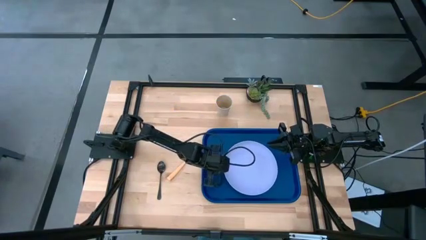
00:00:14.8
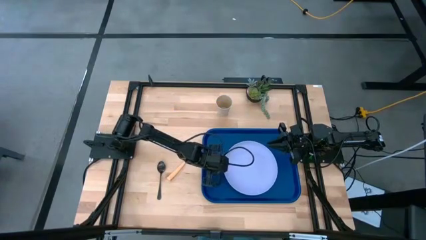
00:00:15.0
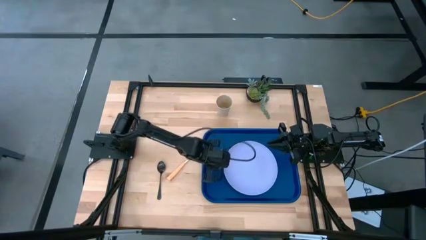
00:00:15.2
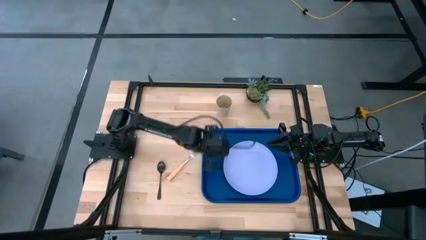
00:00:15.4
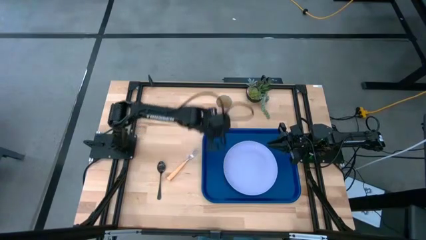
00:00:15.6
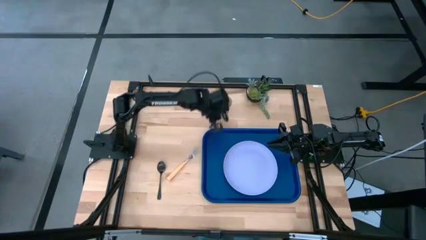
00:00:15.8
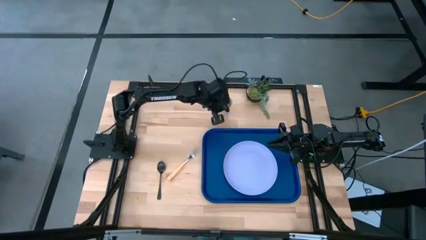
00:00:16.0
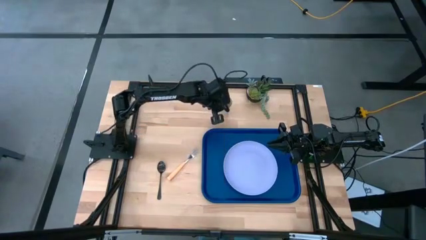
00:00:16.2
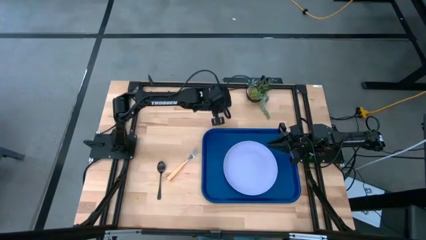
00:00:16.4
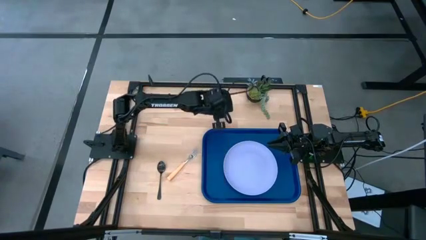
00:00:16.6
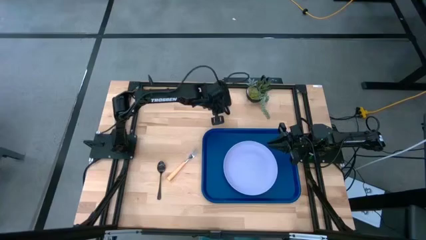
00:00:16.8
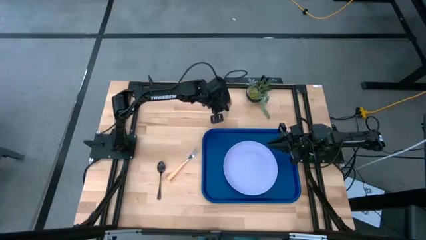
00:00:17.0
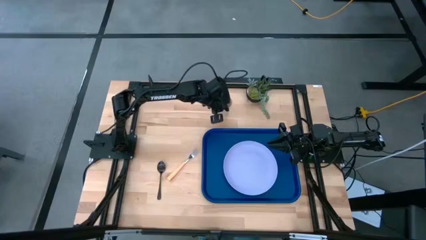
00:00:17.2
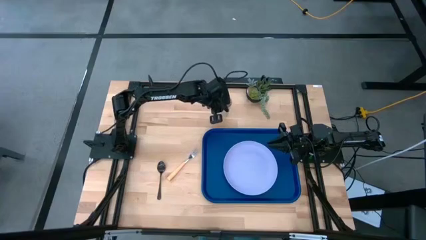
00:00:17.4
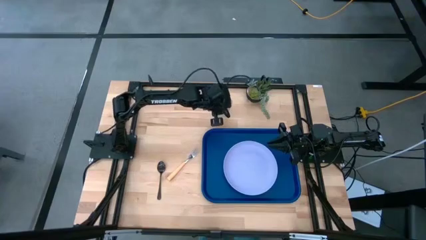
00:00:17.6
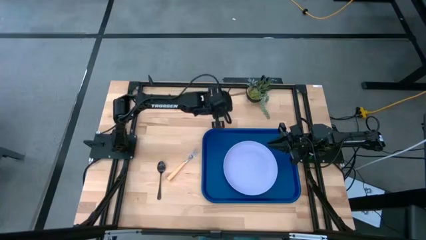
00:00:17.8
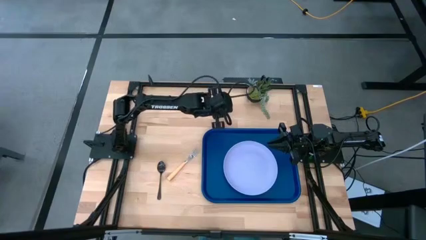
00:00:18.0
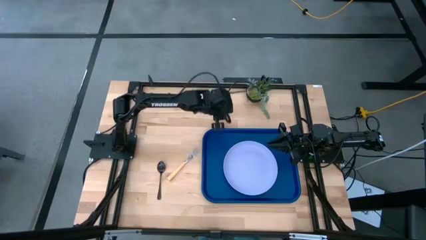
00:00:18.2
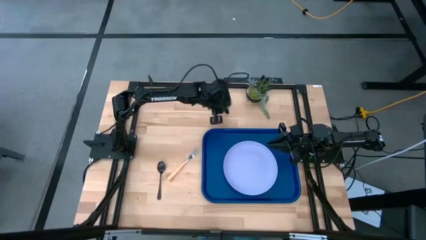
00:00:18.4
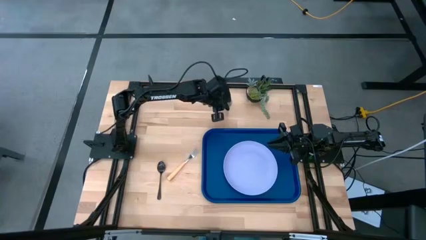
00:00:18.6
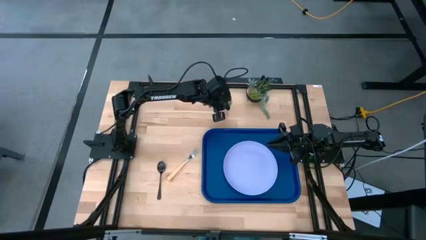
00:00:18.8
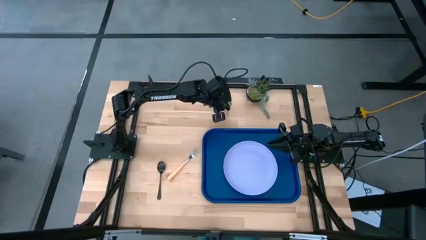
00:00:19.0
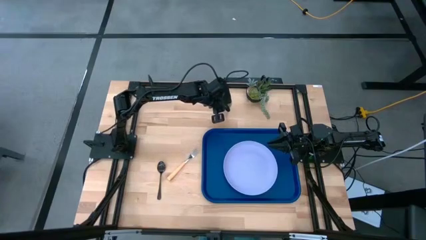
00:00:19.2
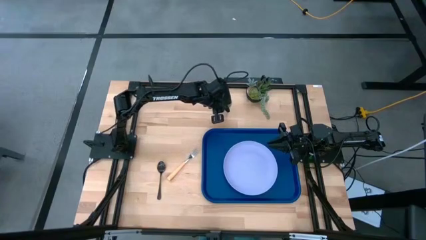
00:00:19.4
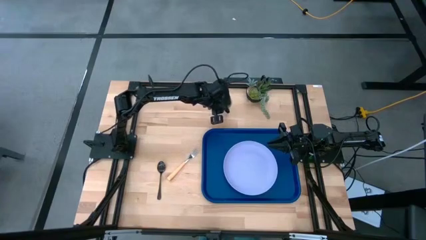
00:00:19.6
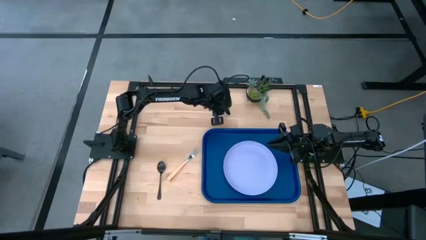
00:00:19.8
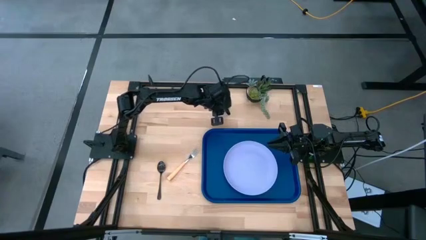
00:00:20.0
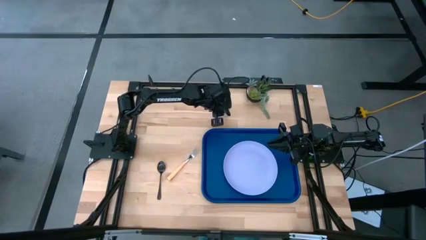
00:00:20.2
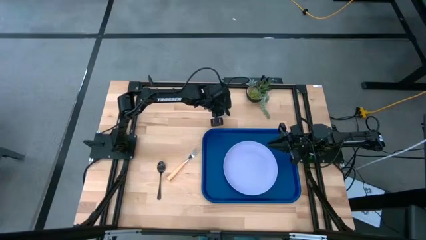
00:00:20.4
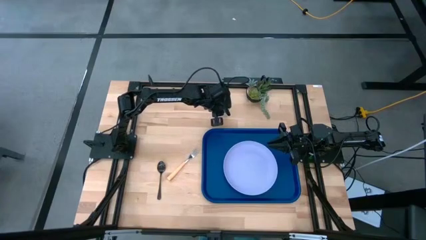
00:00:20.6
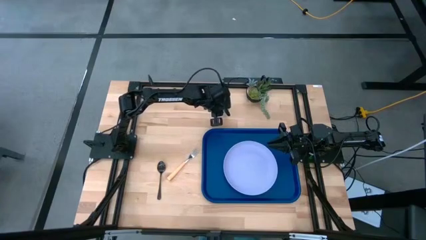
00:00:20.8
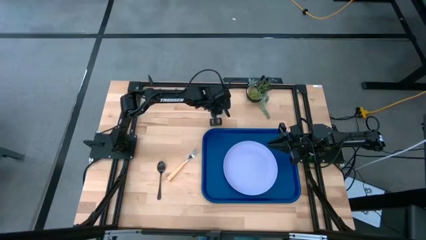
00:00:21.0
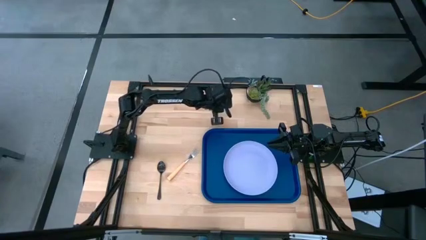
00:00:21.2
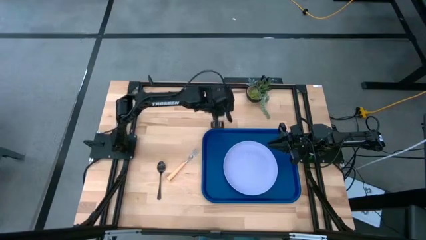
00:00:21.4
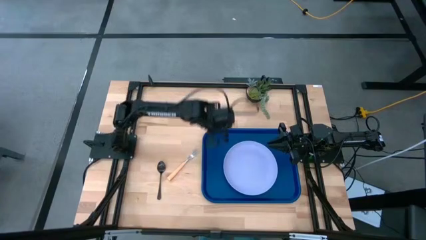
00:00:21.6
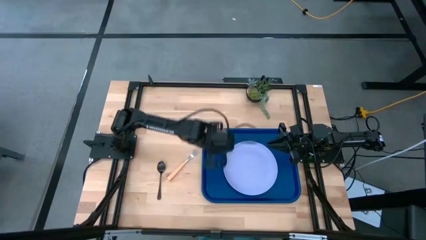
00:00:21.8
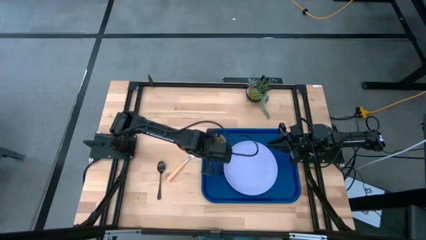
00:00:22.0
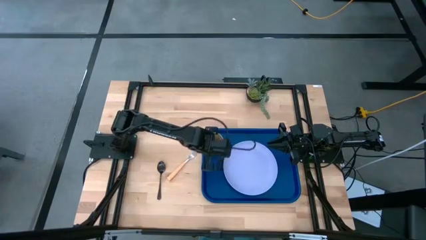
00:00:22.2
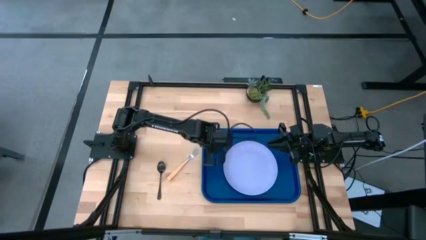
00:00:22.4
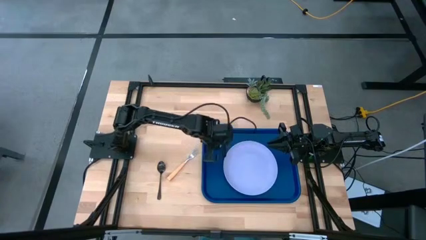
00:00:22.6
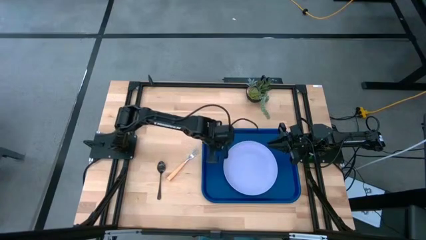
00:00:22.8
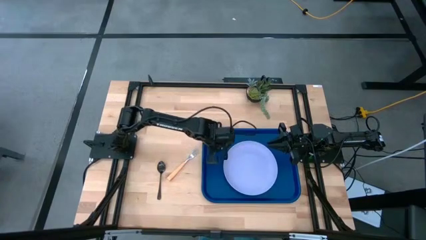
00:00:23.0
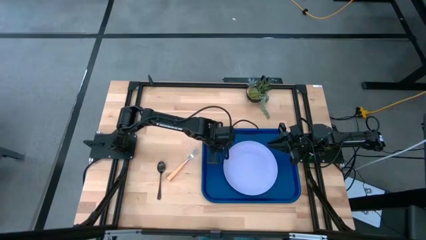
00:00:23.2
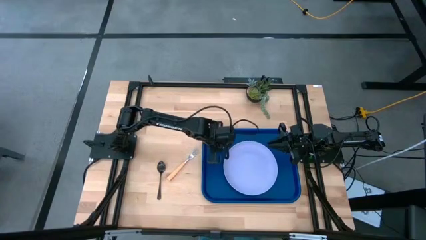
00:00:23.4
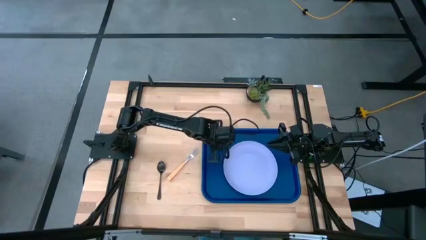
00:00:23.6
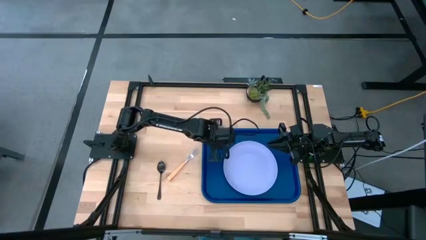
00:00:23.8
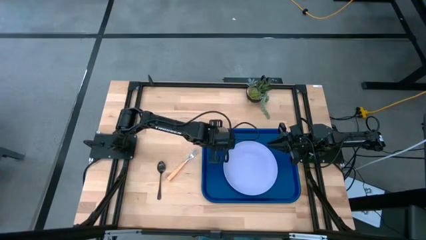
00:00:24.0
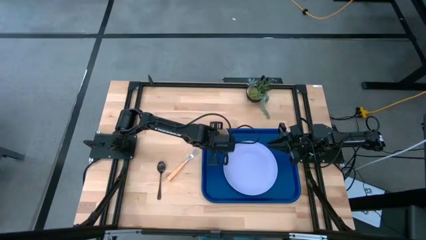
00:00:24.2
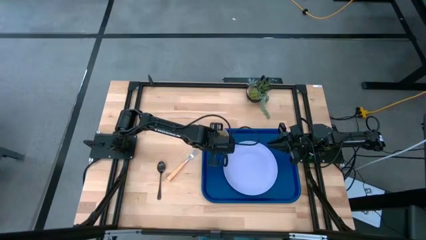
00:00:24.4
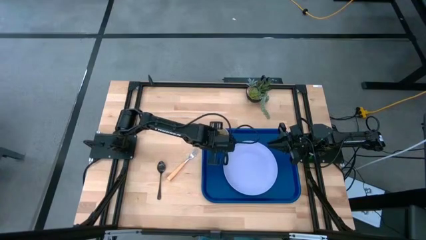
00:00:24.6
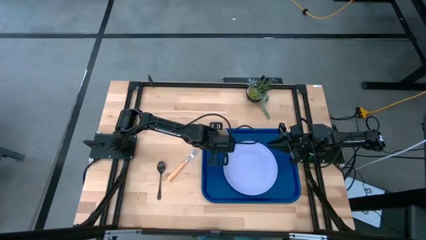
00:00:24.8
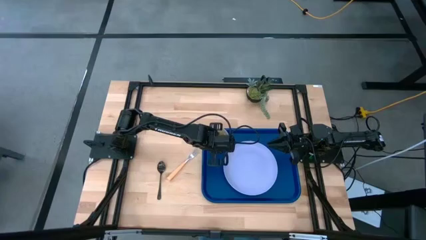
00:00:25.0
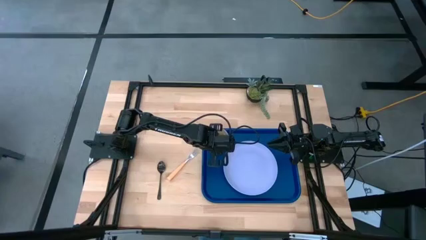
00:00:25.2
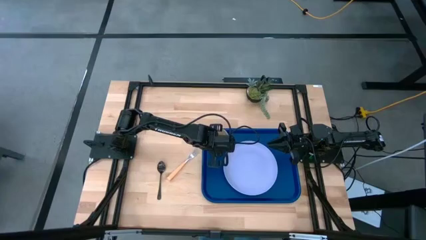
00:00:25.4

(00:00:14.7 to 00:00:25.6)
Task: Pick and place plate/cup/fork/spoon on tray
Put the white cup on the blue serving tray to the top left of the white plate

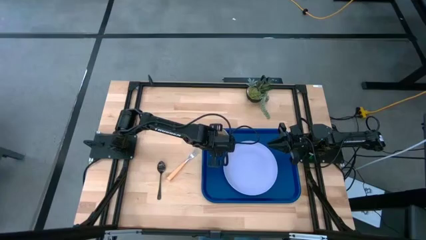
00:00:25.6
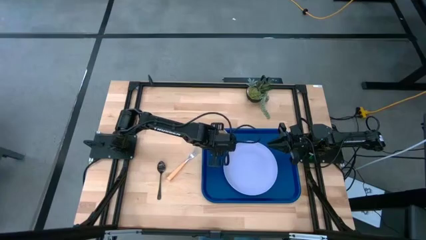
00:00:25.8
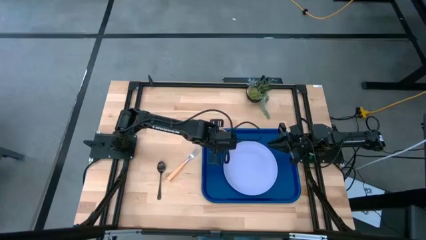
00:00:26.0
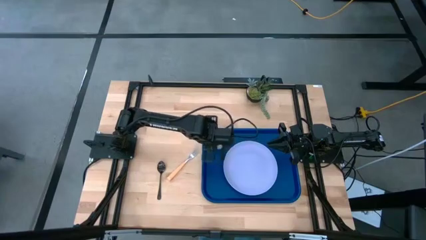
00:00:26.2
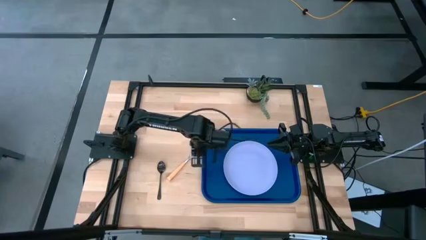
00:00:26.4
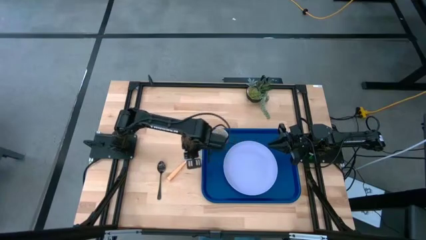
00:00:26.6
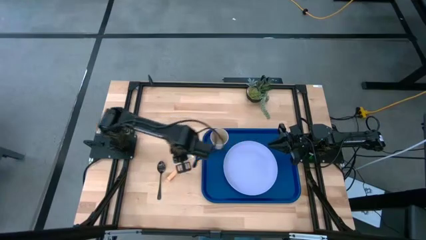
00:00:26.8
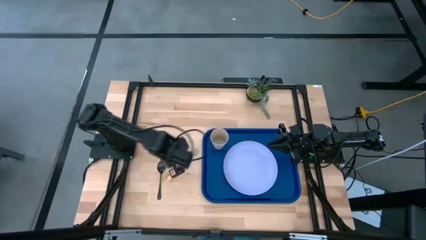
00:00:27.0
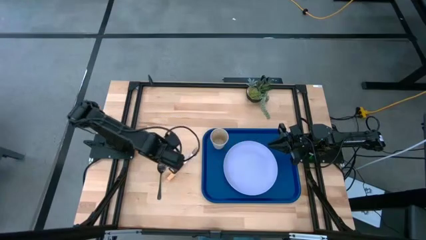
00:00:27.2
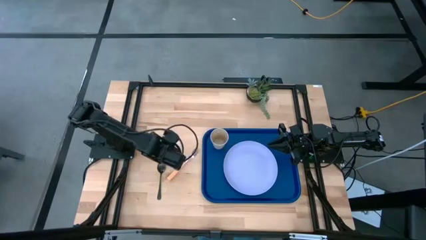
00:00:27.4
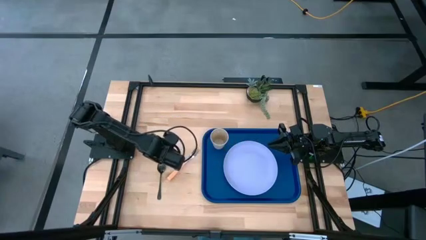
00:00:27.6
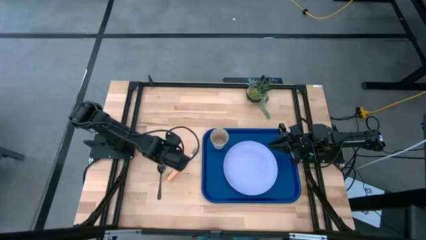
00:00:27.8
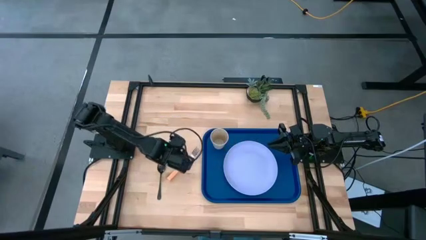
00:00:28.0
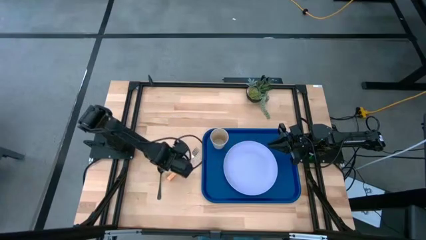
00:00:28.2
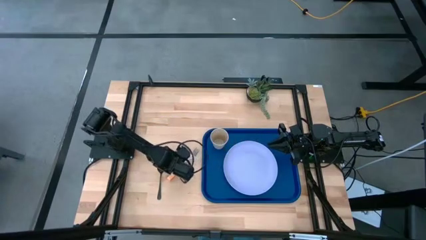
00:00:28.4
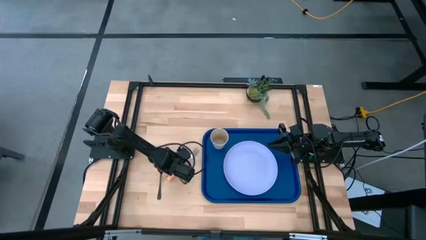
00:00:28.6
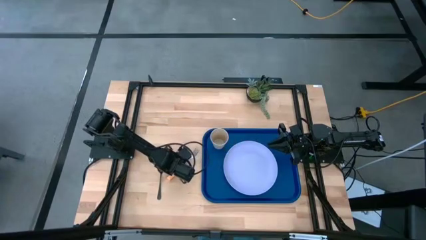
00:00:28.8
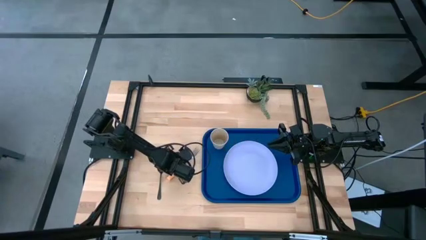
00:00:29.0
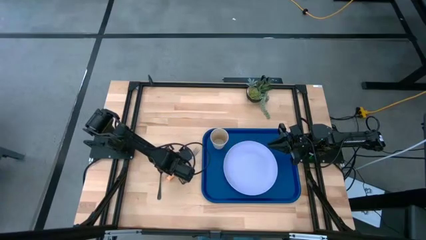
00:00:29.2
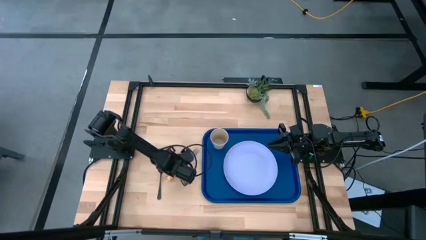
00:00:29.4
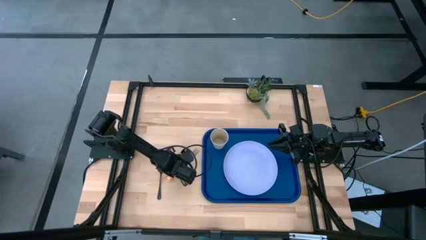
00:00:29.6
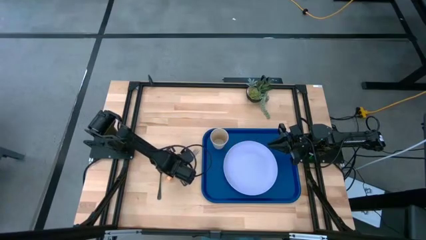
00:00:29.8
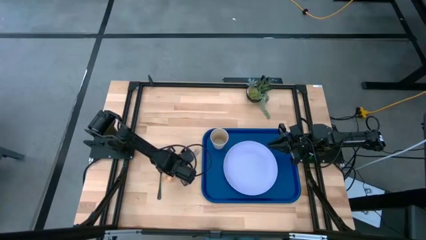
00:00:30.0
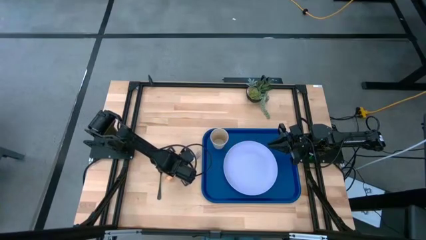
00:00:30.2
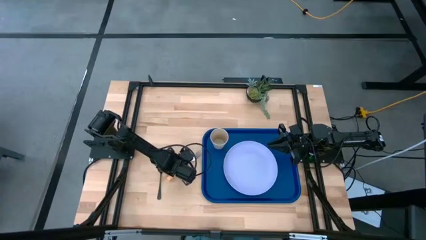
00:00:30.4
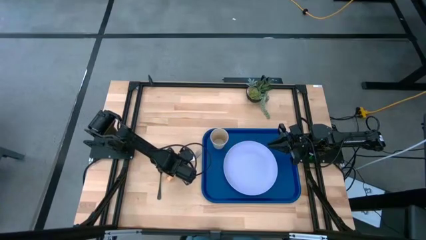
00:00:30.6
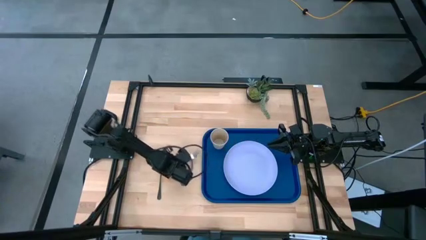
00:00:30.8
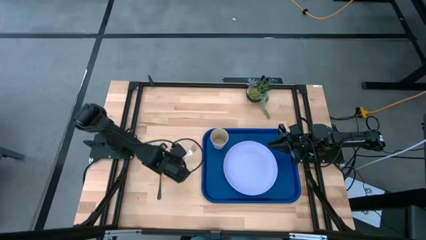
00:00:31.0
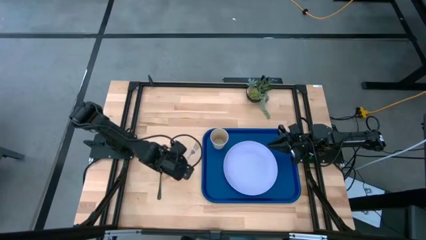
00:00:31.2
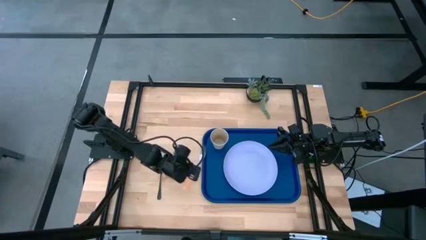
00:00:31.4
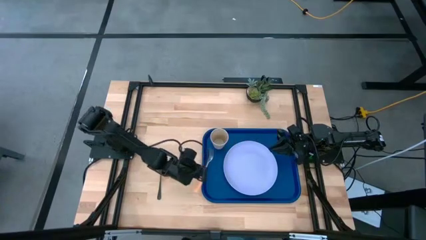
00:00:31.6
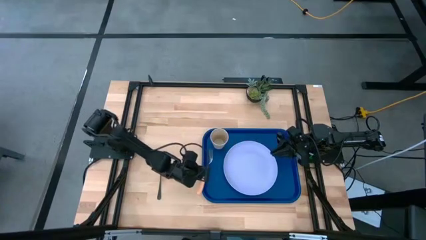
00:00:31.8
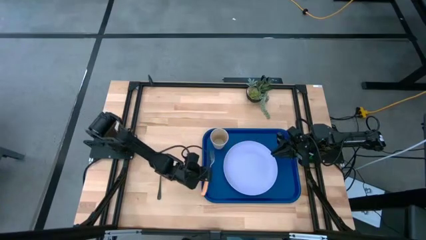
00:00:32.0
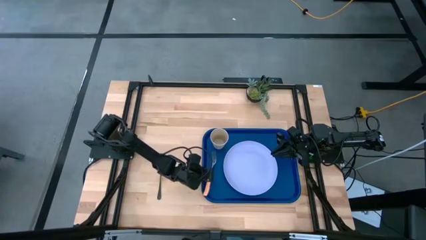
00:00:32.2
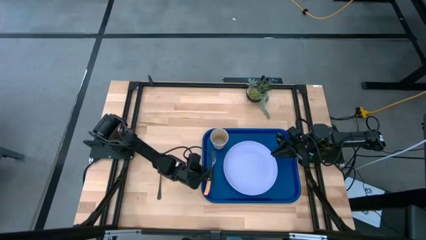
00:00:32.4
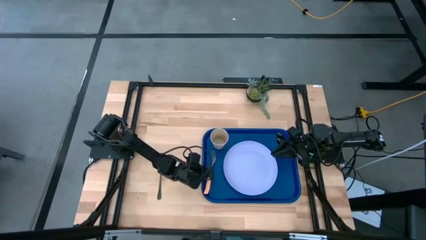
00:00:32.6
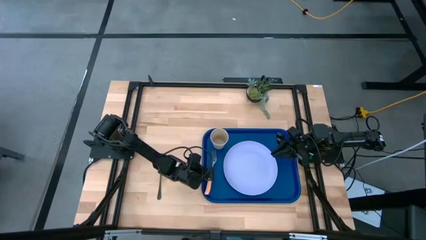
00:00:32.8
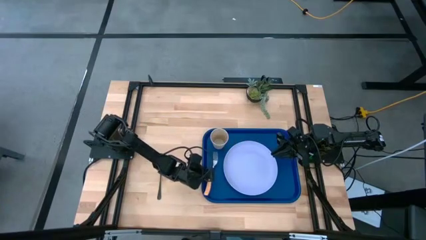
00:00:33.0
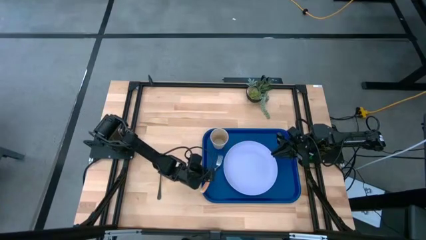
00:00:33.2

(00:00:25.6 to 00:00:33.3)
Put the brown fork on the blue serving tray to the left of the white plate
